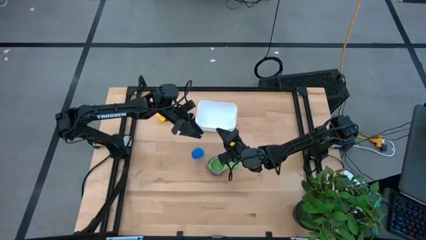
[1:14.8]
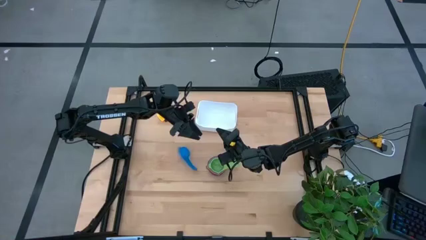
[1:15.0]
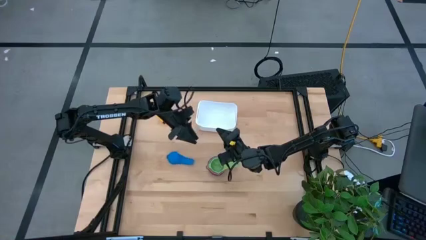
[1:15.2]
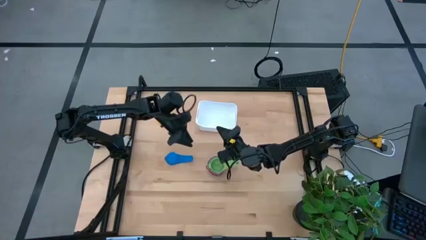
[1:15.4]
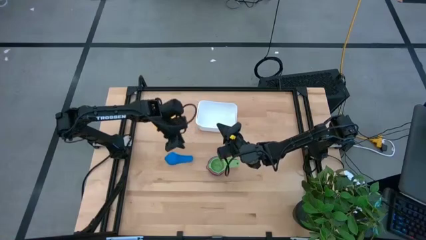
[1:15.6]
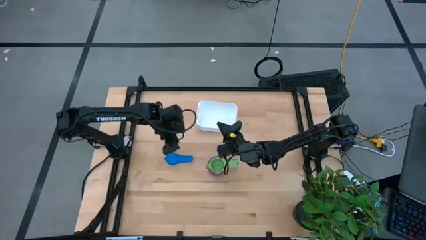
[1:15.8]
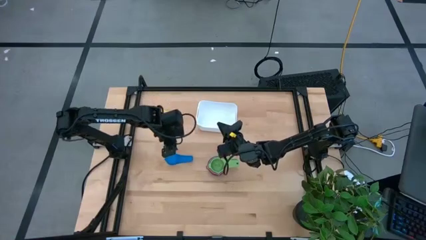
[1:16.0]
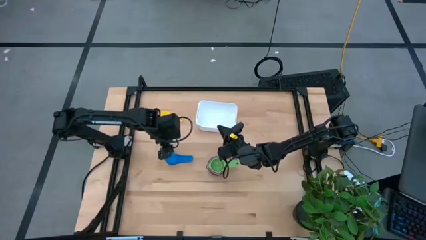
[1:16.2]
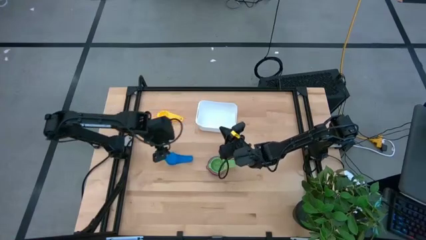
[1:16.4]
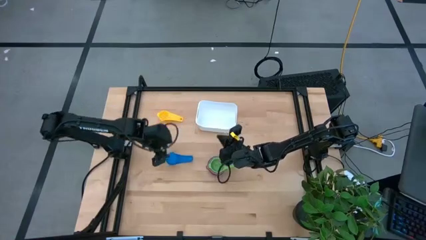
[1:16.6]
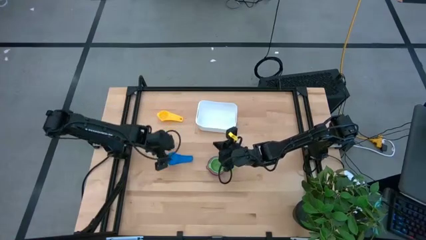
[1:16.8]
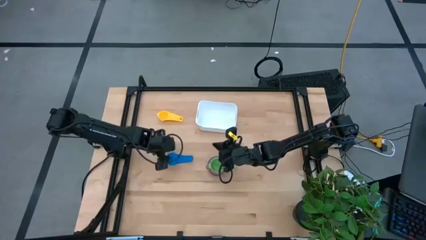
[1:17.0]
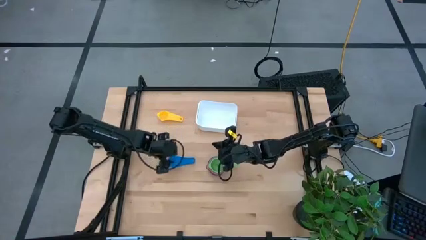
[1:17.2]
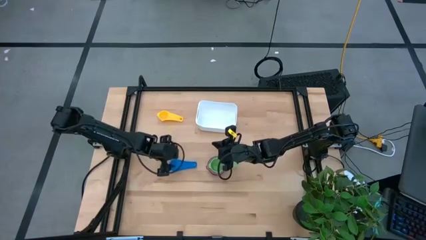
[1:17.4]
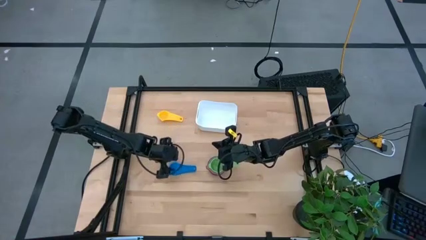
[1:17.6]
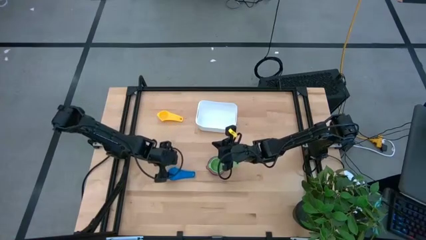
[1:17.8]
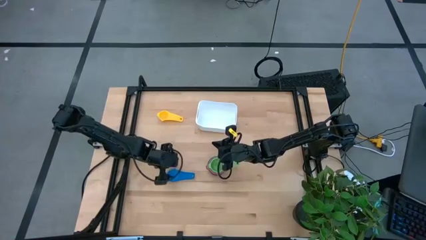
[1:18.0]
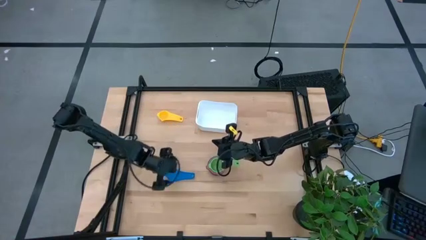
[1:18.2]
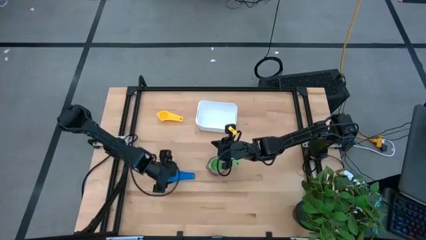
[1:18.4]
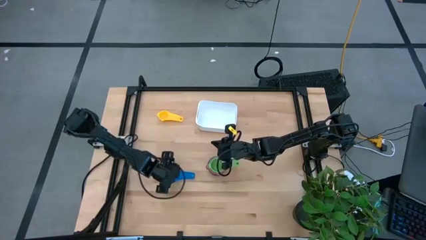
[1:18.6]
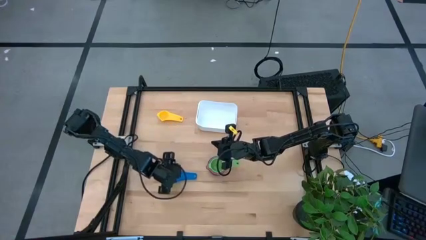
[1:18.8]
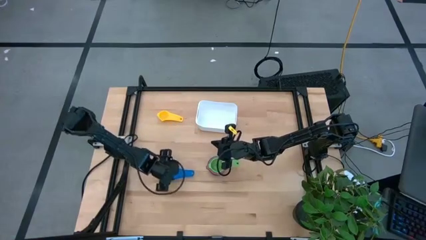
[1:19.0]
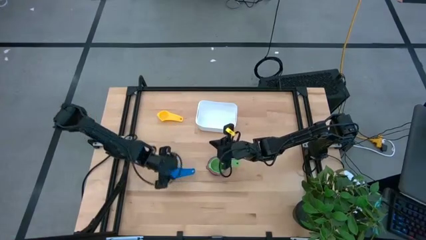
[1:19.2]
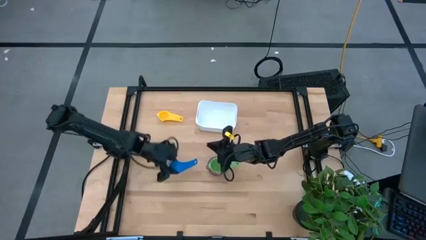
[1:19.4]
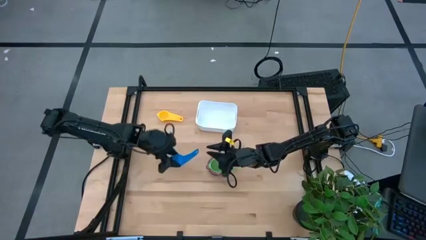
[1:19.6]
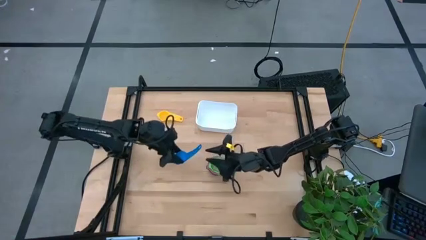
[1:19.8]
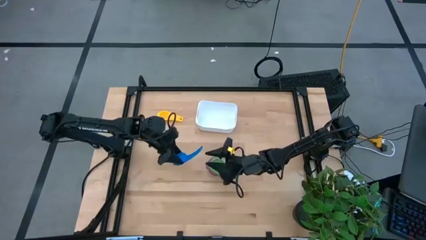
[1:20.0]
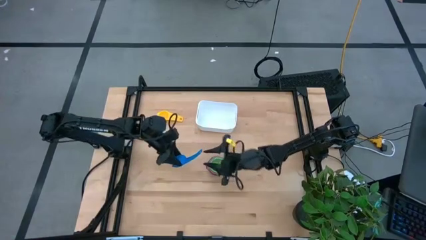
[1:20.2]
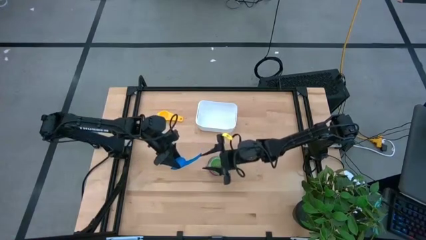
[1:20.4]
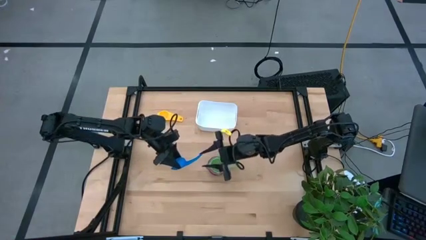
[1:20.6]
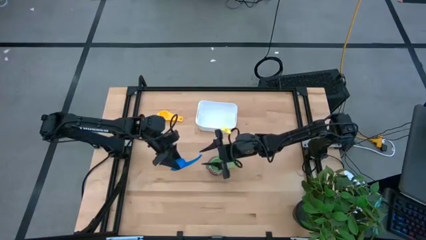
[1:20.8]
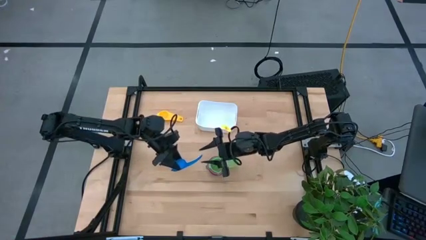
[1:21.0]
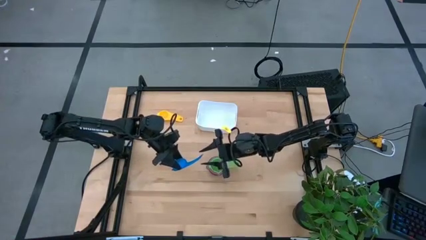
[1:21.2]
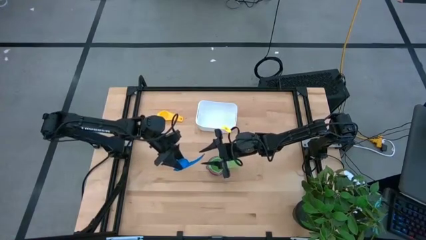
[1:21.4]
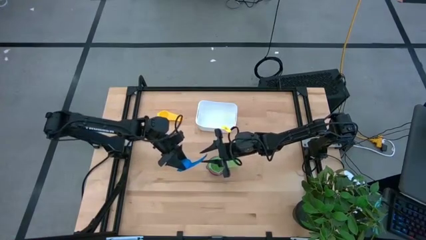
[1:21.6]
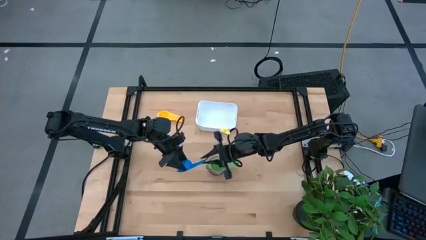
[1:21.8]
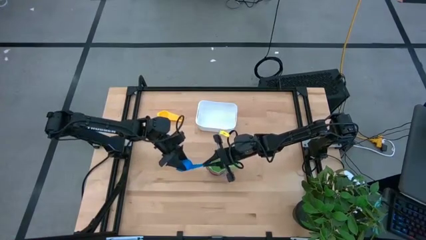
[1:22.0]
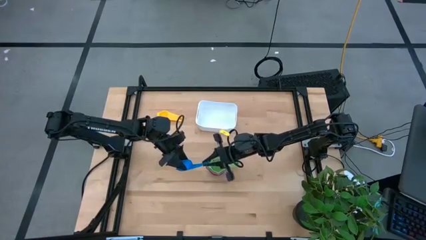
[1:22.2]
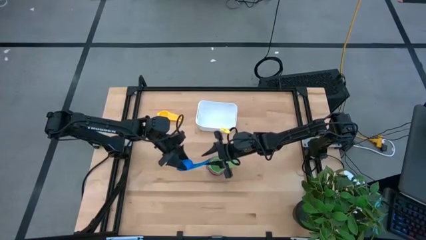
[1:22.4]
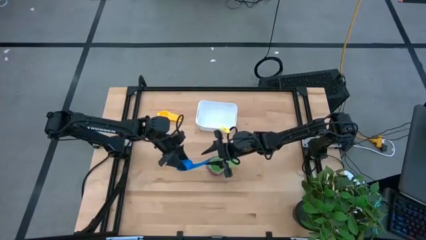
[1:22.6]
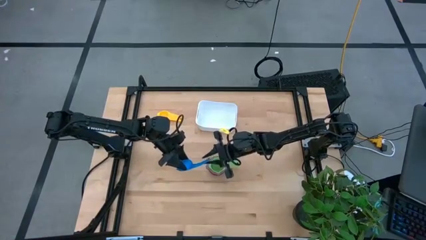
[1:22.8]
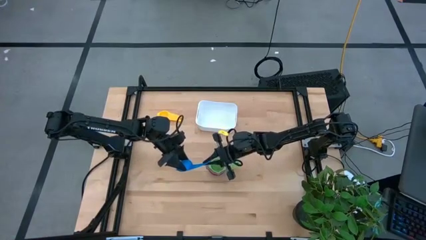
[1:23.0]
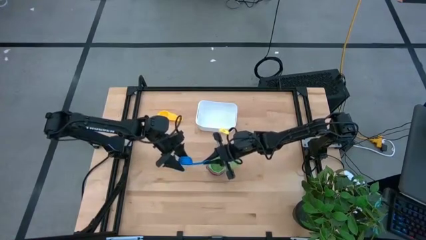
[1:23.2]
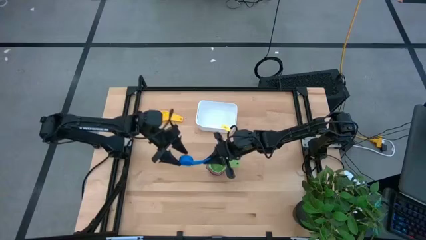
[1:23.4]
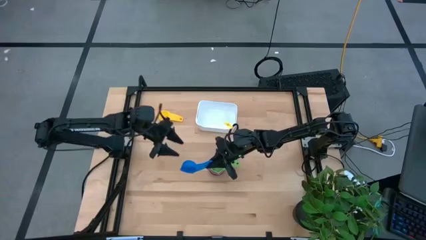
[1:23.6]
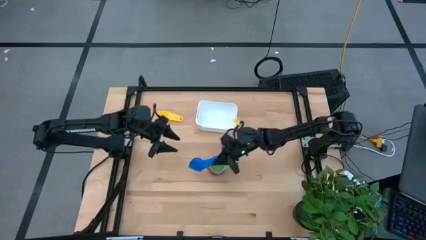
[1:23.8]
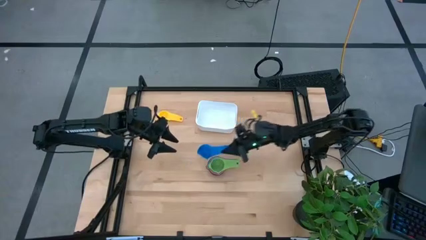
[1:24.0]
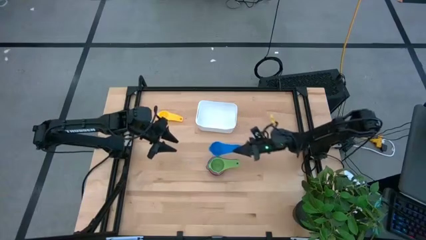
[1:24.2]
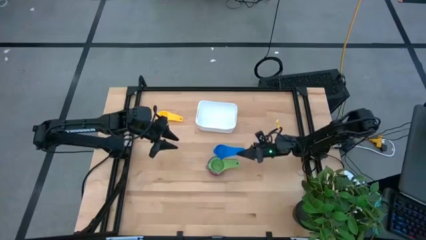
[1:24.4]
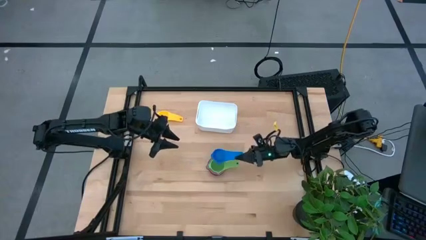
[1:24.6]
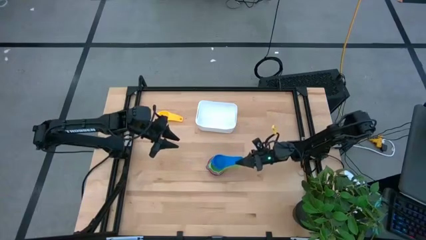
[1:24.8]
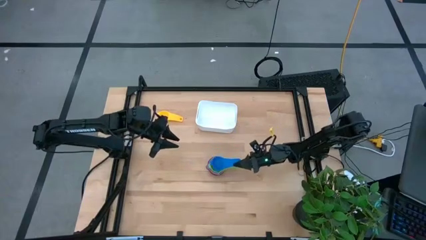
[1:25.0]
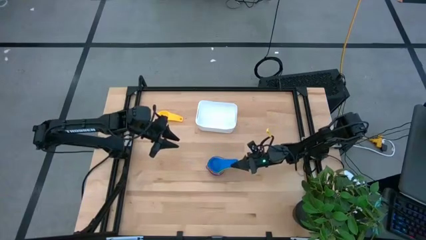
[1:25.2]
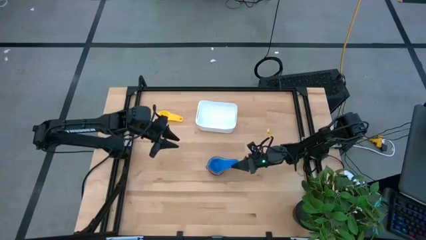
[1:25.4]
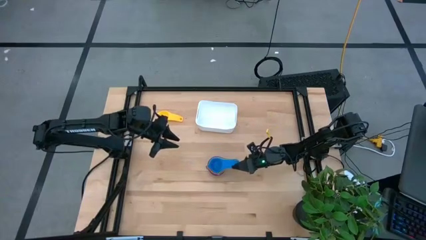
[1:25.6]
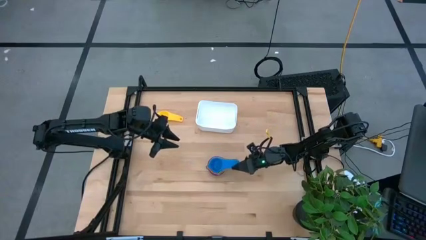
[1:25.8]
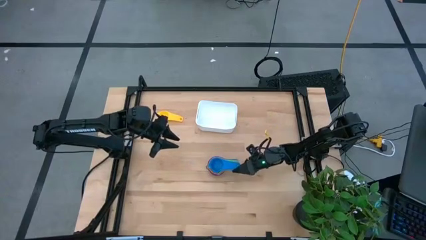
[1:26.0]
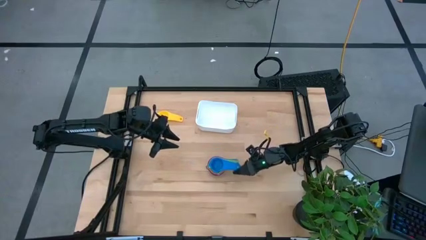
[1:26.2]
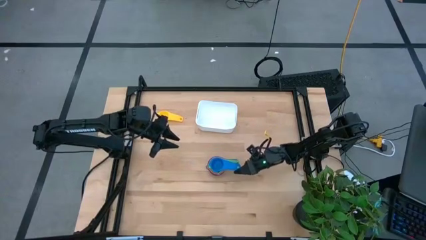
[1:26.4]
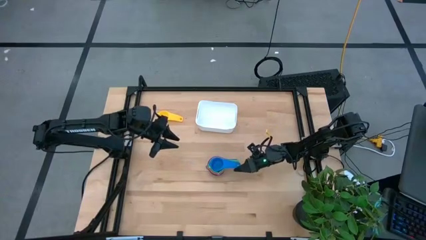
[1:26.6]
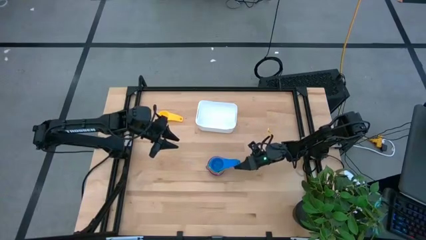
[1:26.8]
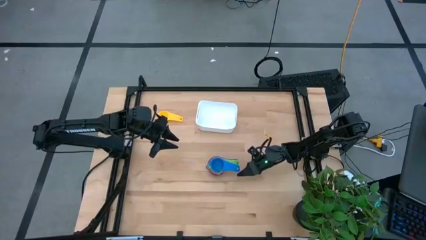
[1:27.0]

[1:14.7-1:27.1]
Task: Nest measuring cups in basket
Stack the dark blue measuring cup on top of the green measuring cup
